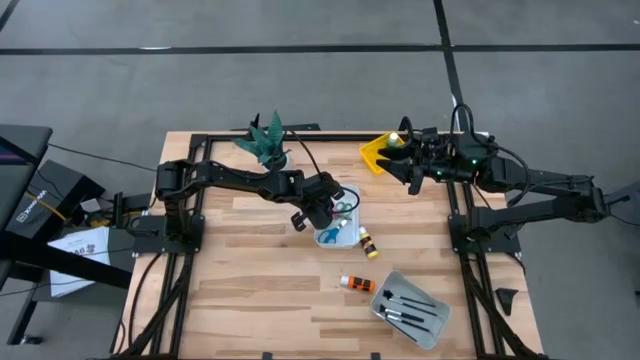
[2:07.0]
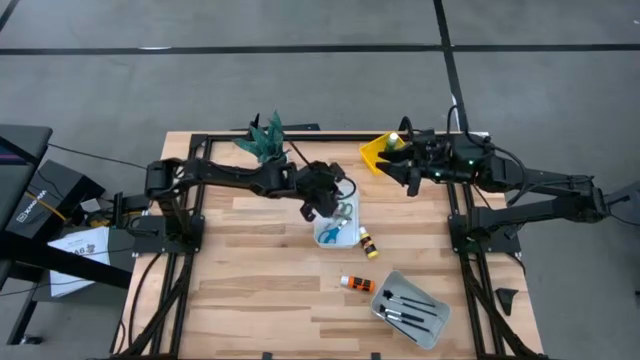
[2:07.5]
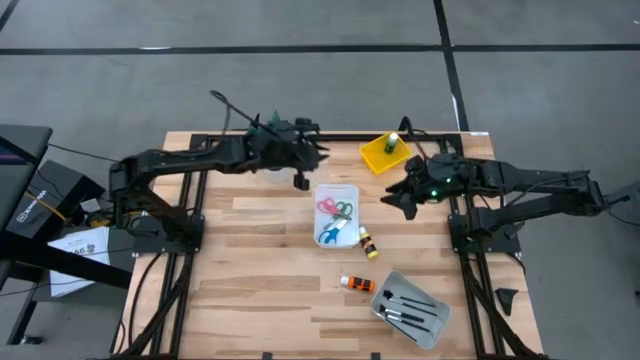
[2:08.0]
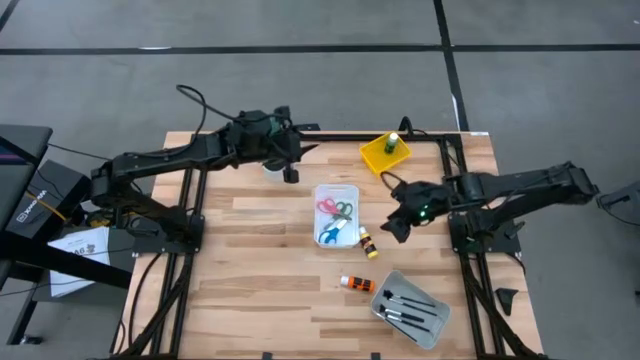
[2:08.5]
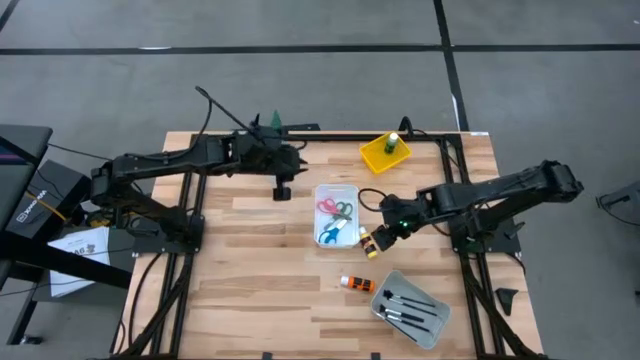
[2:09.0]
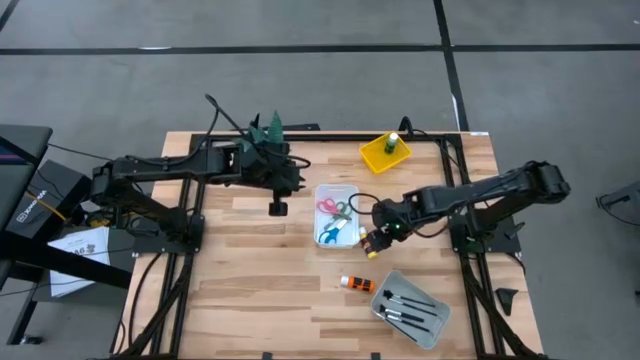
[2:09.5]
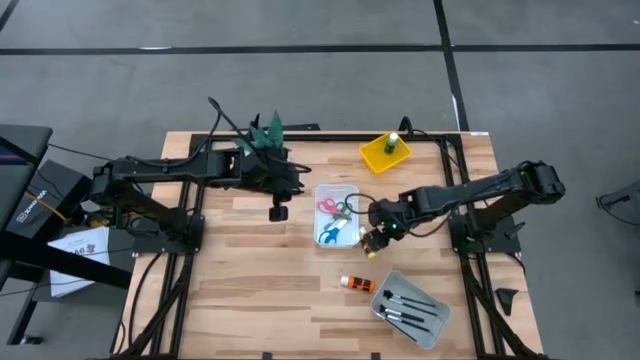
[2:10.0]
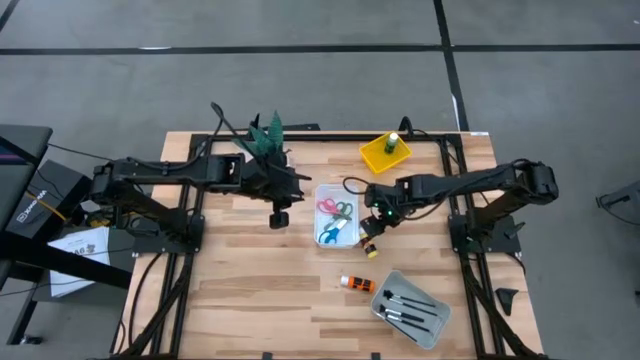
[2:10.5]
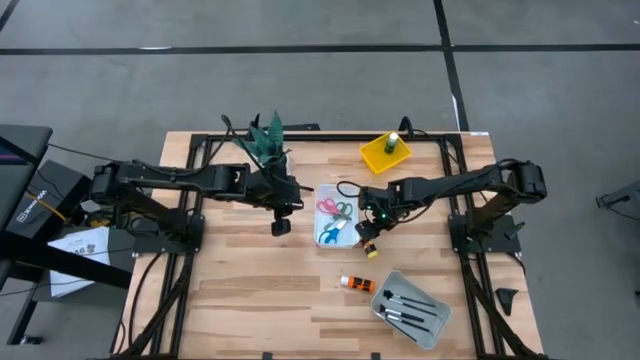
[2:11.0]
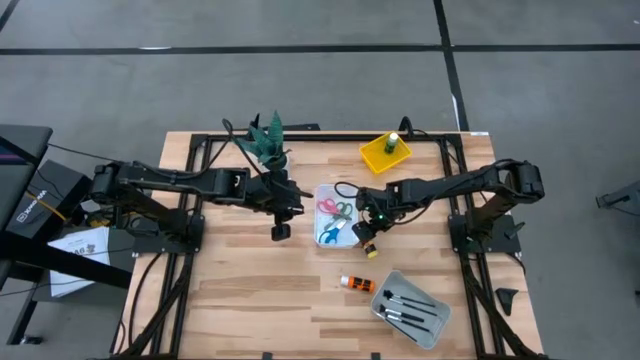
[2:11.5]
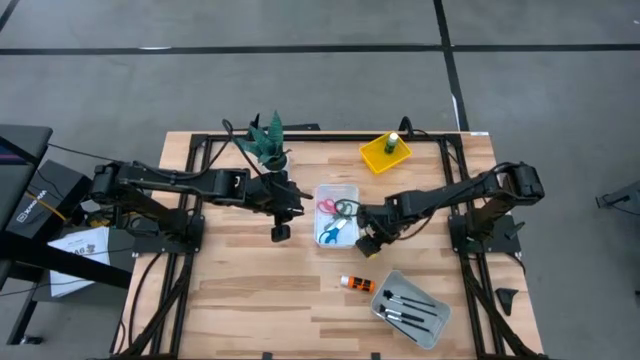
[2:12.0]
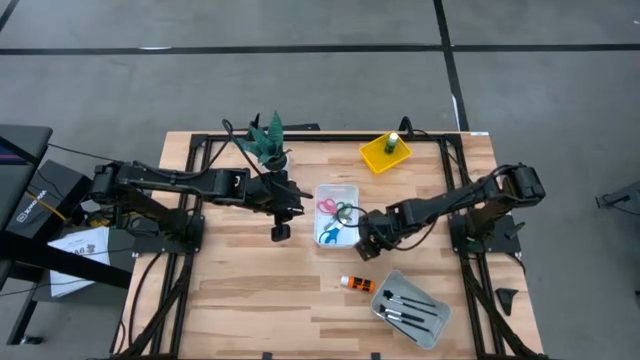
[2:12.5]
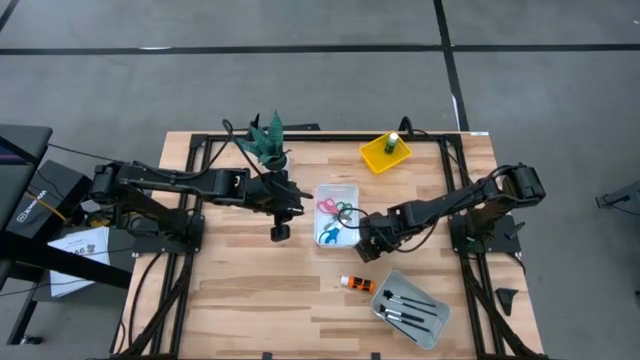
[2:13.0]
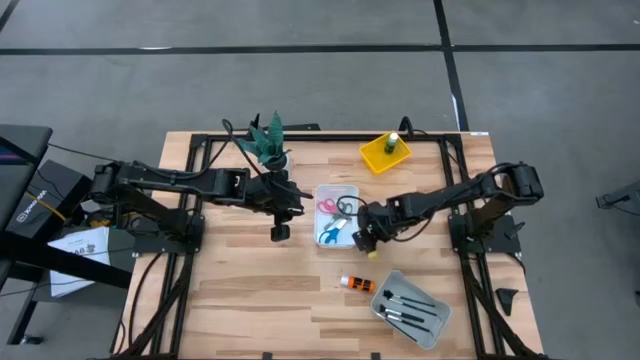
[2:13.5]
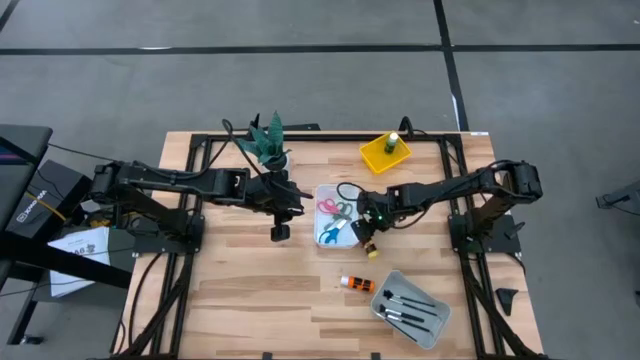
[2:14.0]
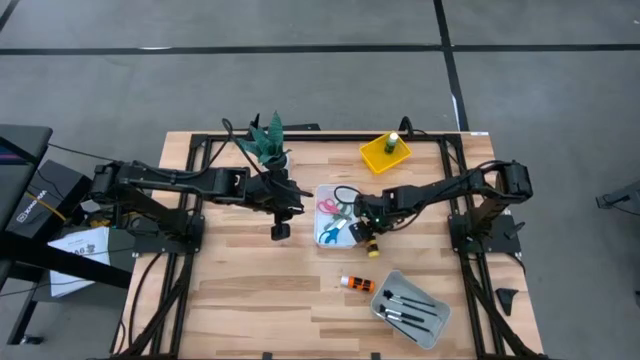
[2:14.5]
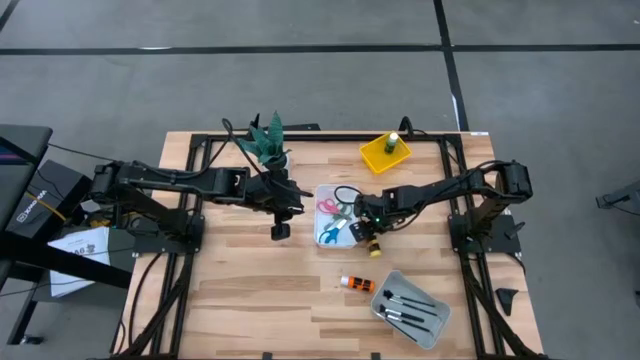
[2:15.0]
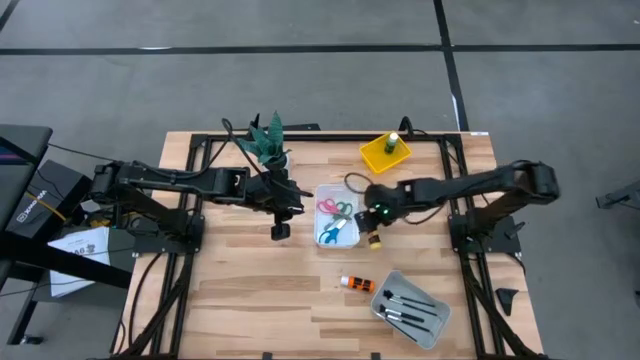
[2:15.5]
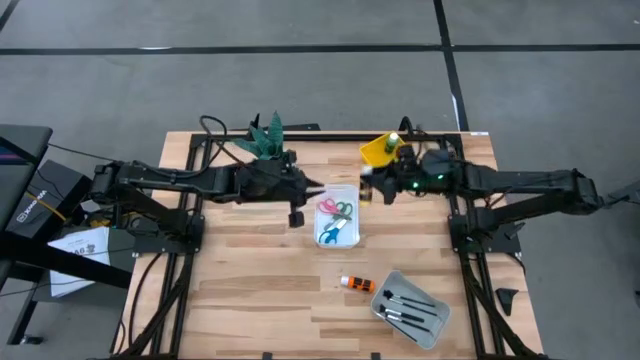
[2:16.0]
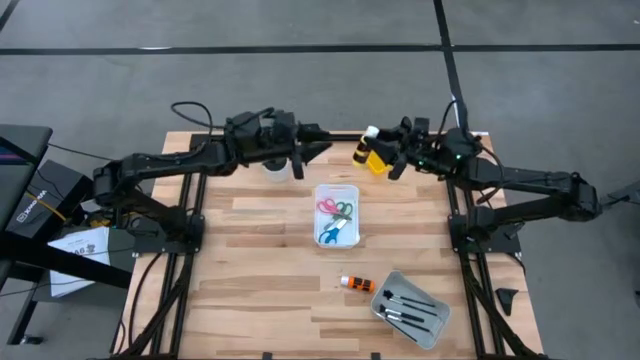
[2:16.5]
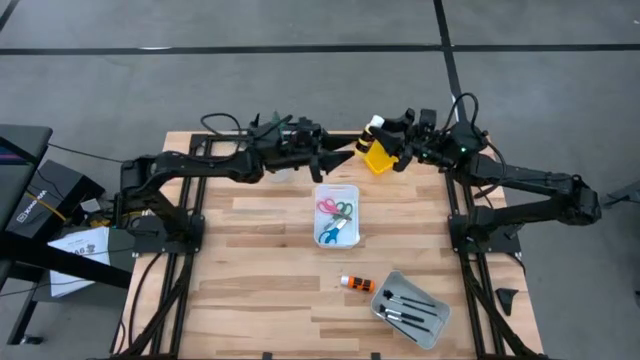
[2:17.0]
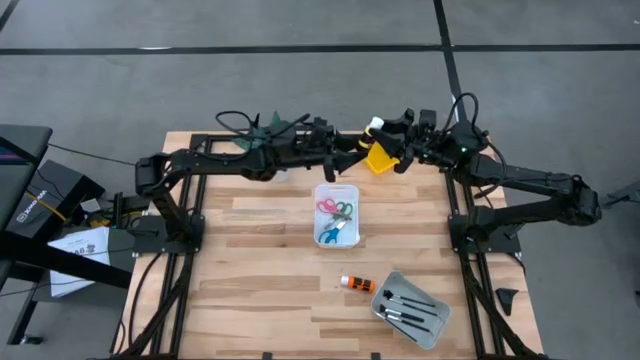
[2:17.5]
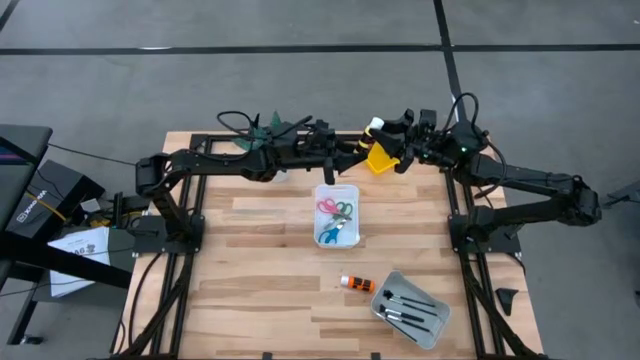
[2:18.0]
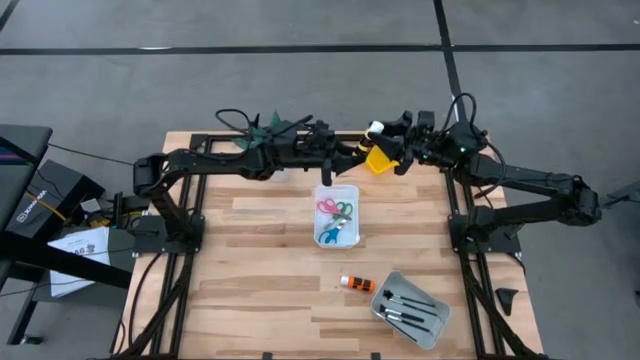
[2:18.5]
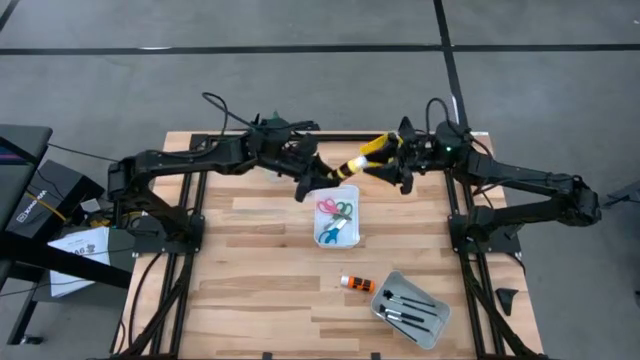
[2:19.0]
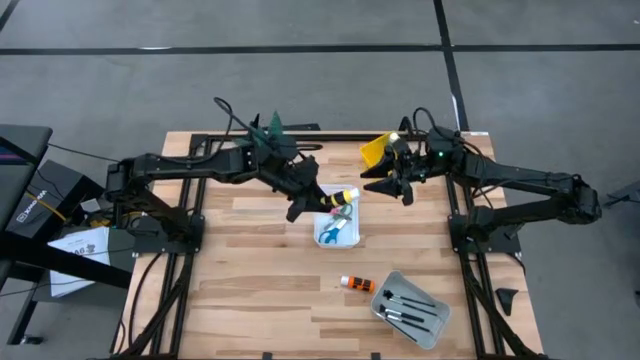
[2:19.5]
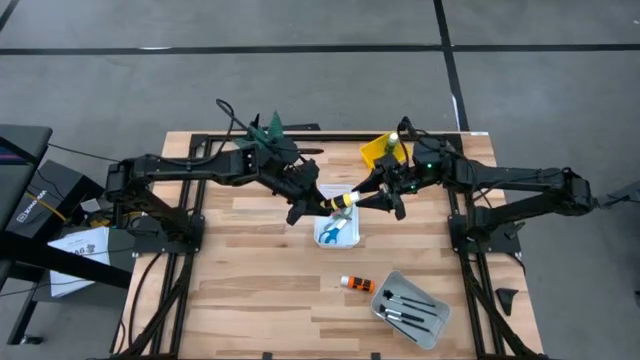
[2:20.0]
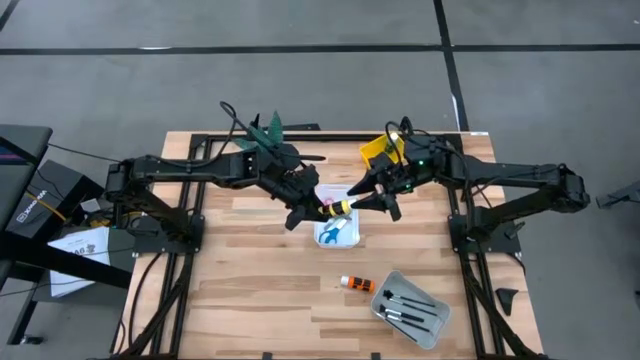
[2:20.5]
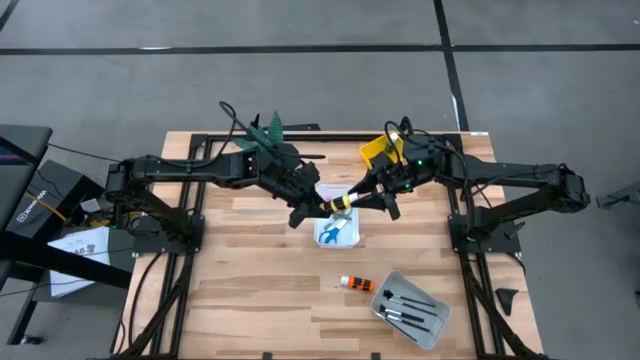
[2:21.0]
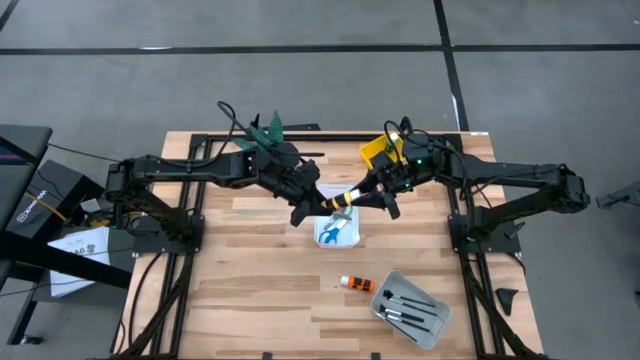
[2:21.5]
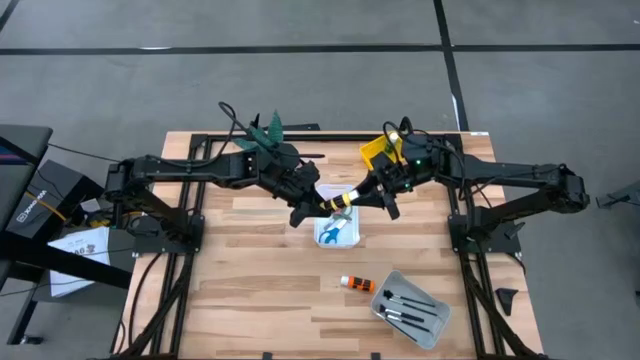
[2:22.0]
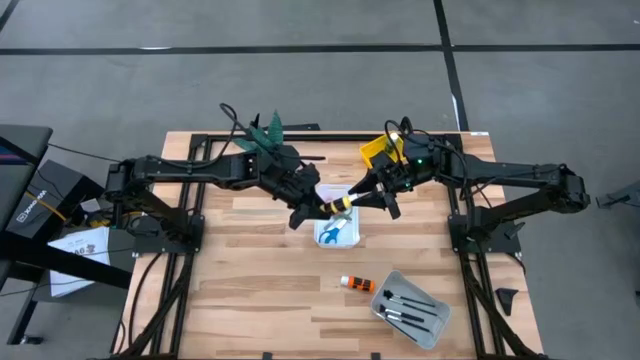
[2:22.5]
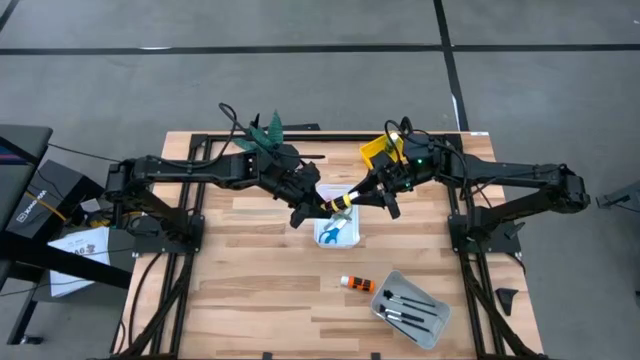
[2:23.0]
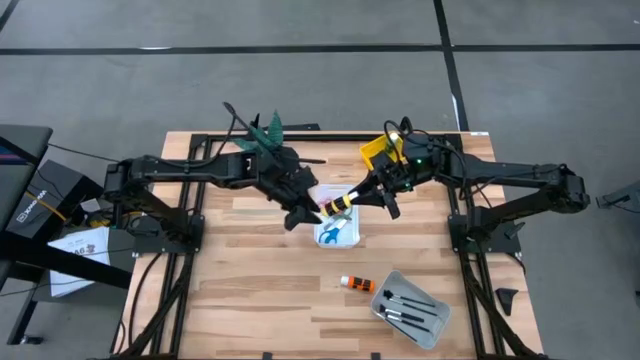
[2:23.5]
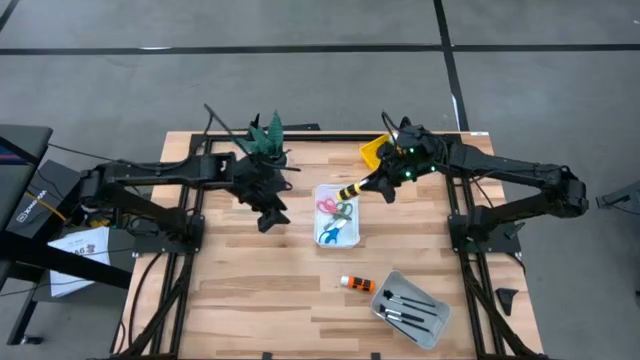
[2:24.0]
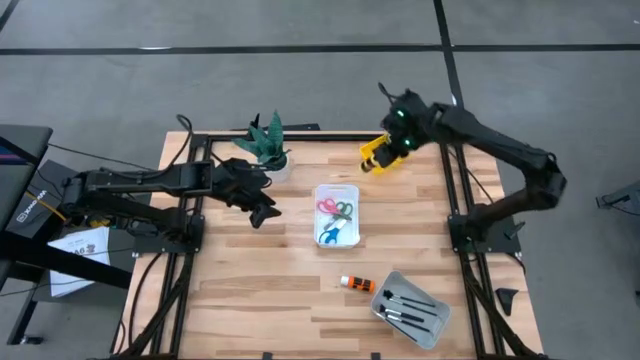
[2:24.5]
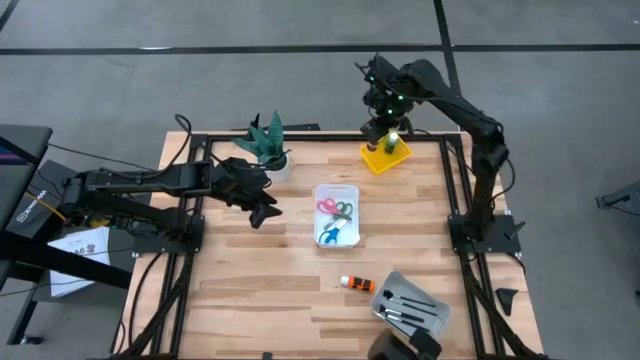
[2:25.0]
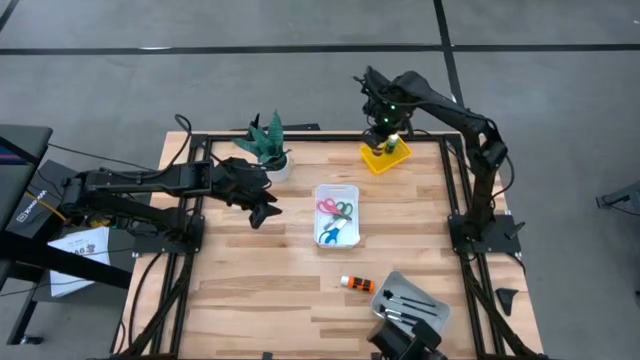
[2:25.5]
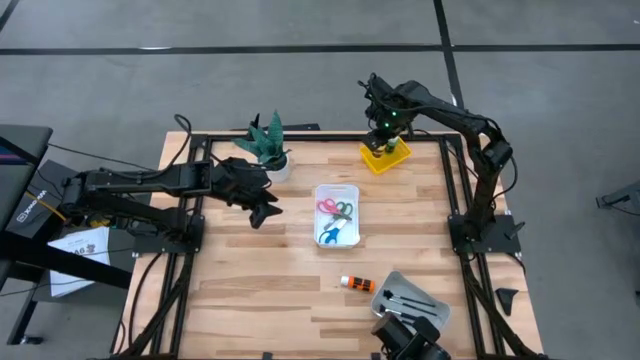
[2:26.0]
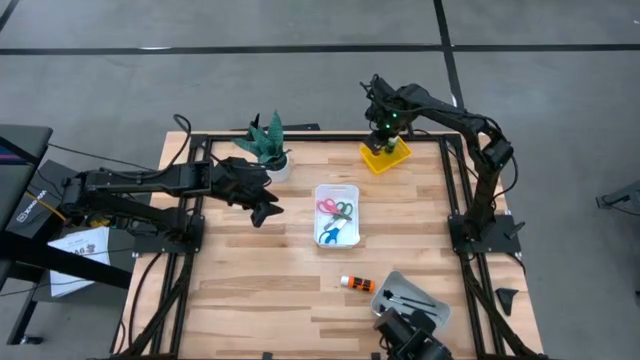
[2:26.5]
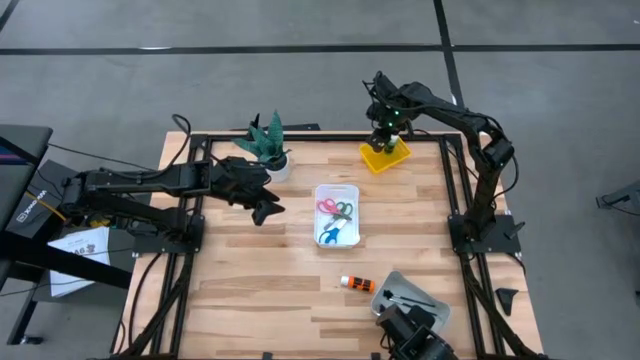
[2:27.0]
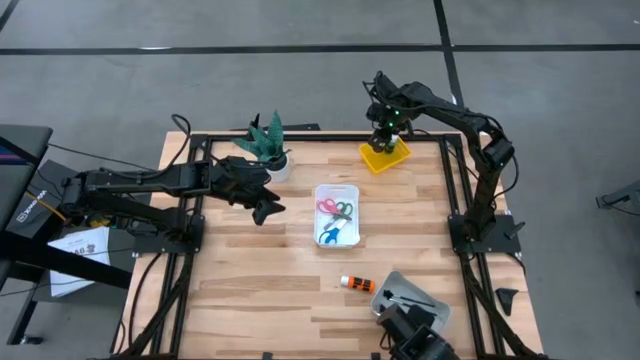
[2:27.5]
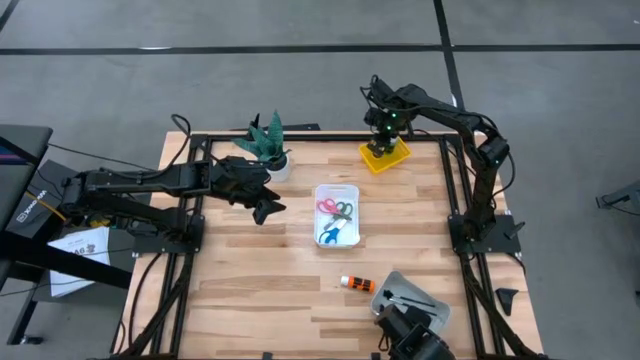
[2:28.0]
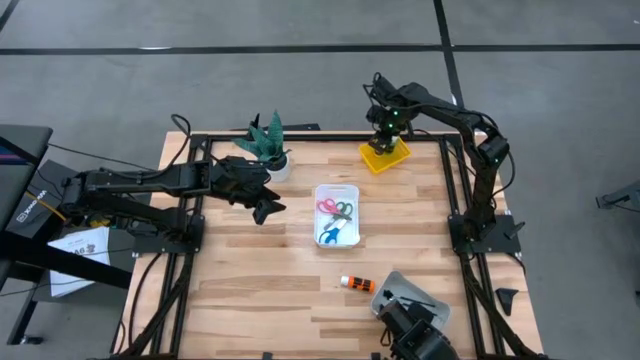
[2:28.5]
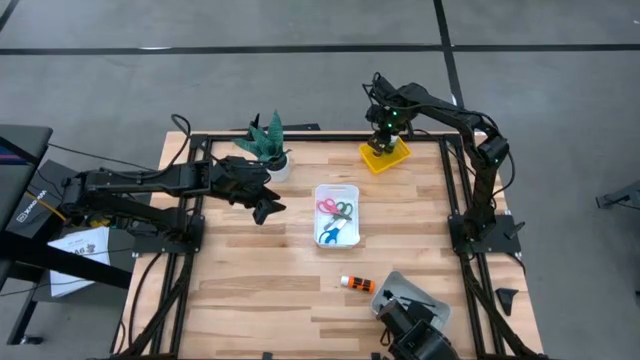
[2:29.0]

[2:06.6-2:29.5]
Task: Pick & Place Paint Supplies
Put the yellow acrylic paint bottle into the yellow basket
